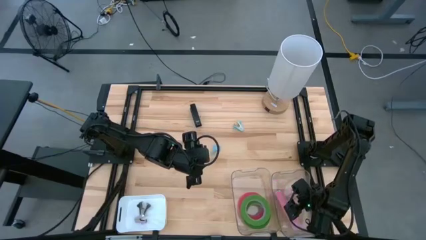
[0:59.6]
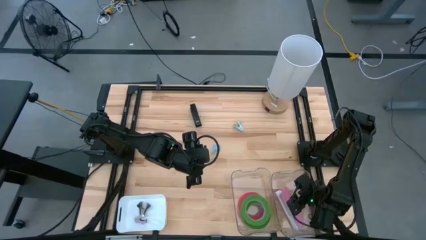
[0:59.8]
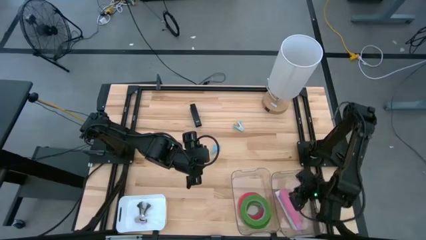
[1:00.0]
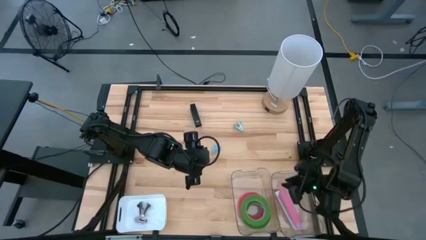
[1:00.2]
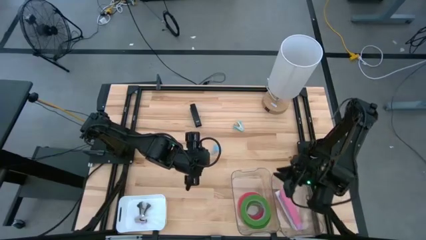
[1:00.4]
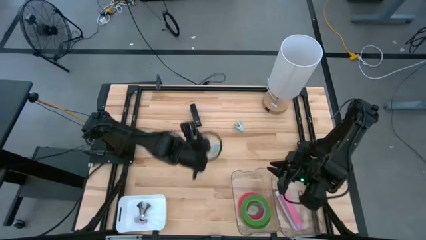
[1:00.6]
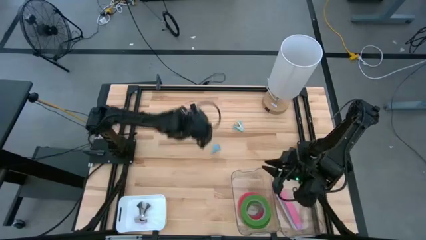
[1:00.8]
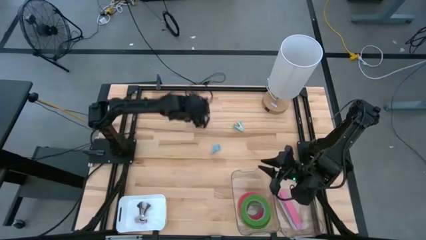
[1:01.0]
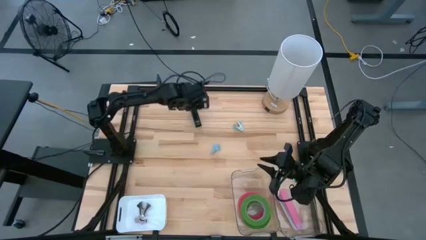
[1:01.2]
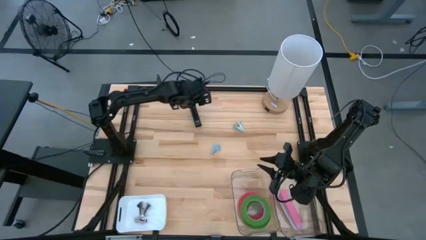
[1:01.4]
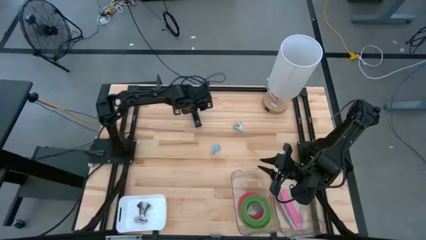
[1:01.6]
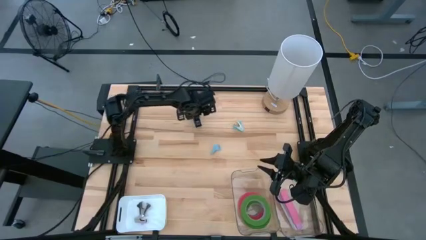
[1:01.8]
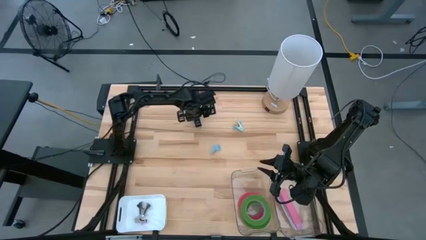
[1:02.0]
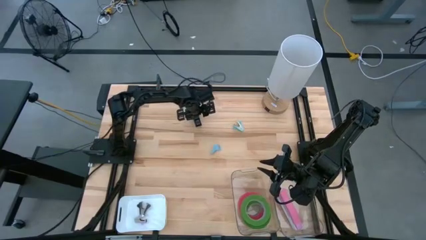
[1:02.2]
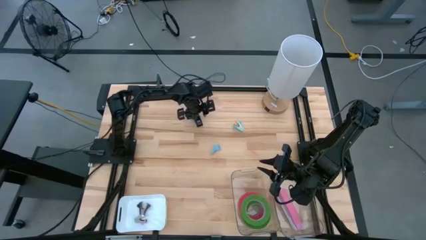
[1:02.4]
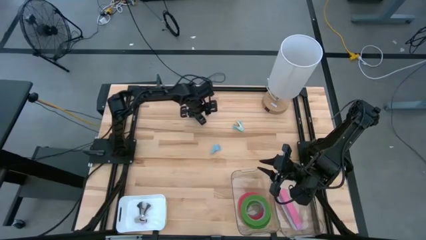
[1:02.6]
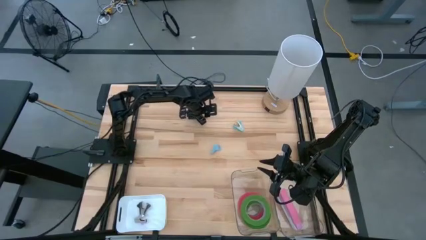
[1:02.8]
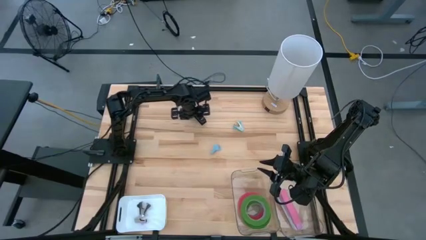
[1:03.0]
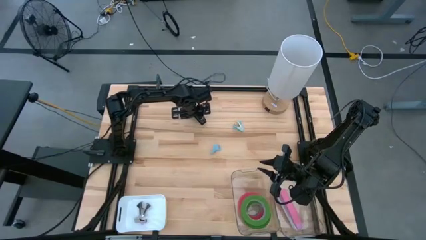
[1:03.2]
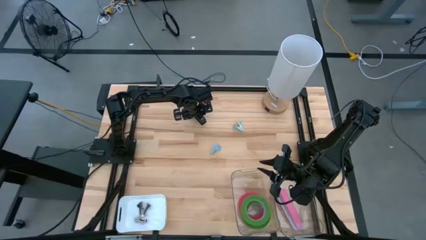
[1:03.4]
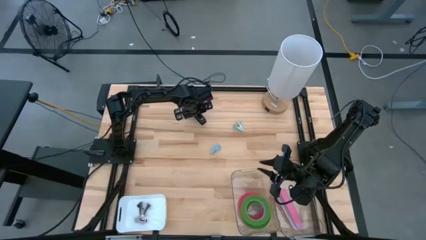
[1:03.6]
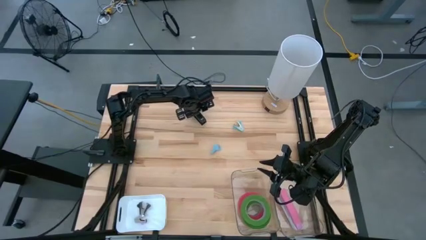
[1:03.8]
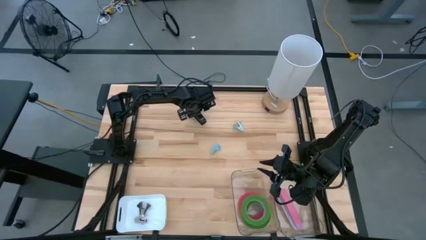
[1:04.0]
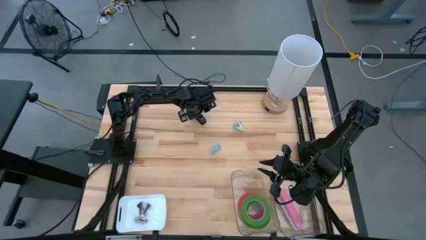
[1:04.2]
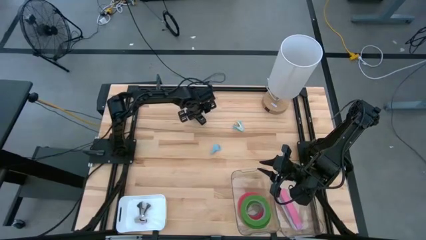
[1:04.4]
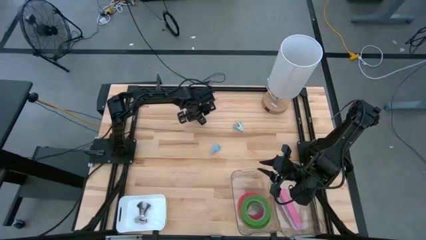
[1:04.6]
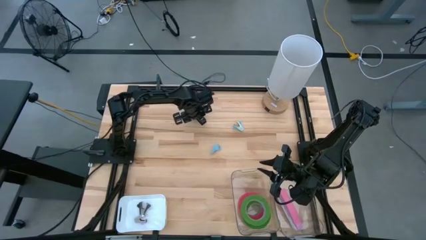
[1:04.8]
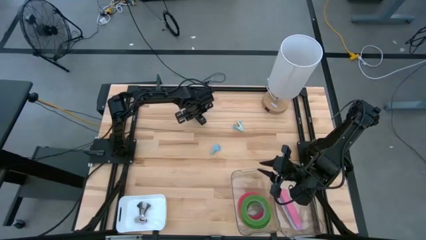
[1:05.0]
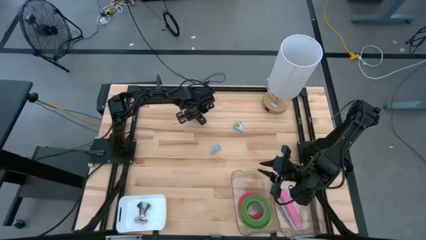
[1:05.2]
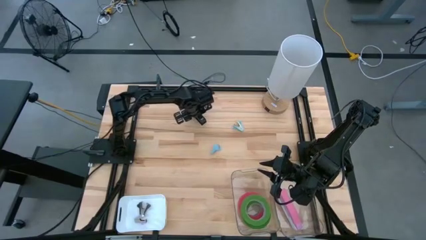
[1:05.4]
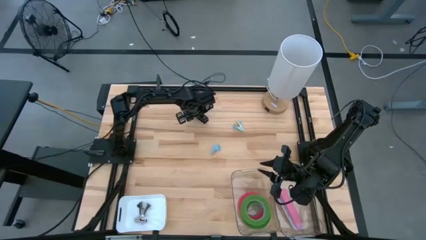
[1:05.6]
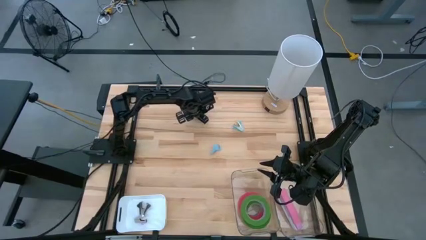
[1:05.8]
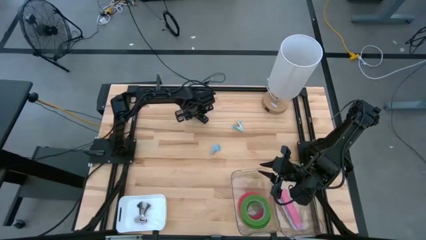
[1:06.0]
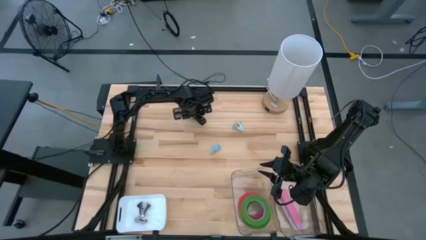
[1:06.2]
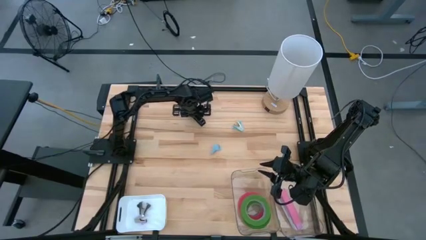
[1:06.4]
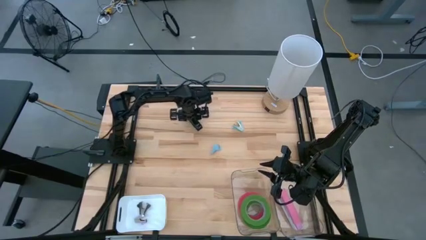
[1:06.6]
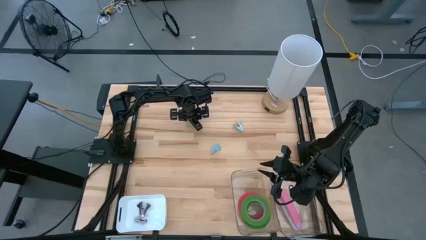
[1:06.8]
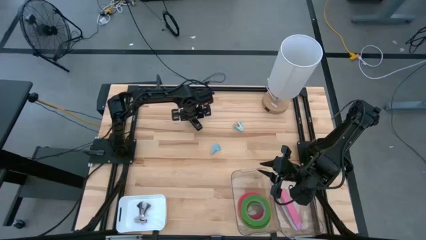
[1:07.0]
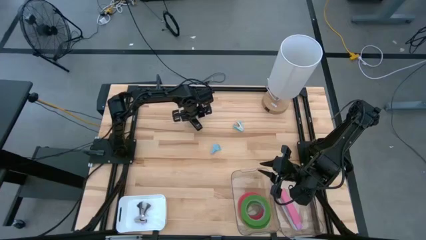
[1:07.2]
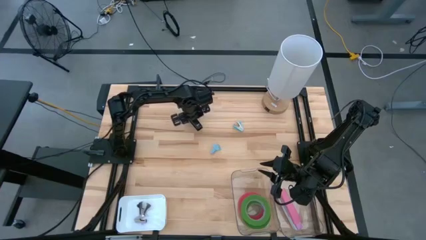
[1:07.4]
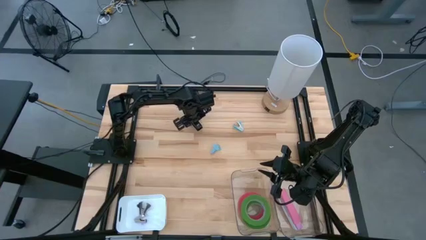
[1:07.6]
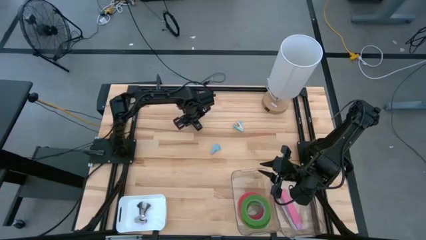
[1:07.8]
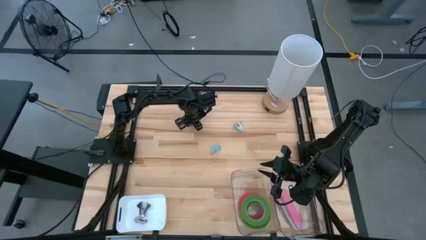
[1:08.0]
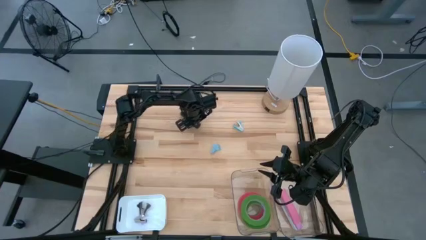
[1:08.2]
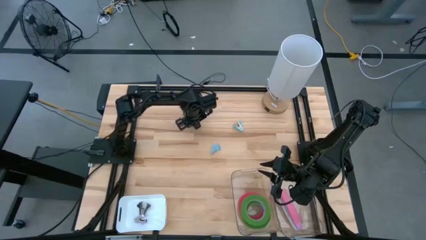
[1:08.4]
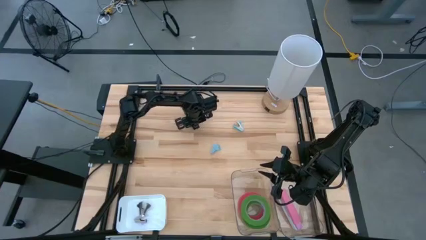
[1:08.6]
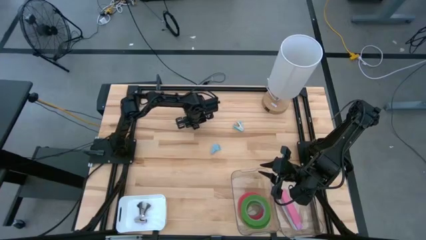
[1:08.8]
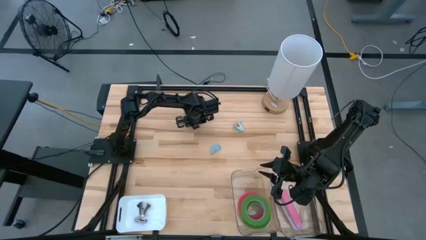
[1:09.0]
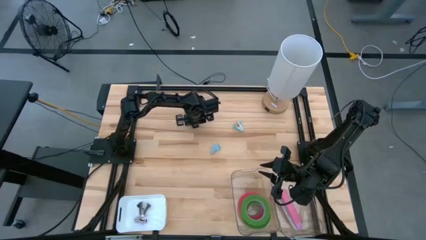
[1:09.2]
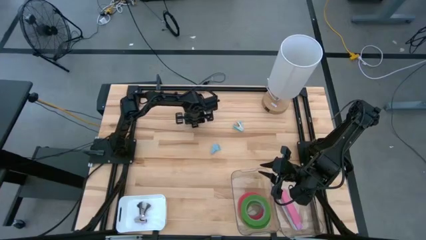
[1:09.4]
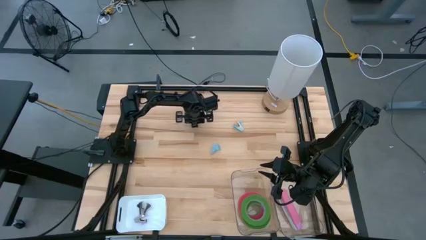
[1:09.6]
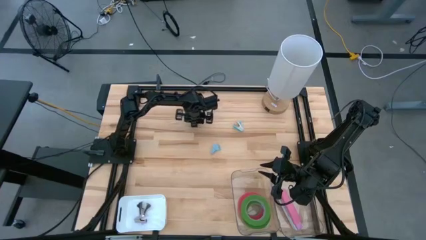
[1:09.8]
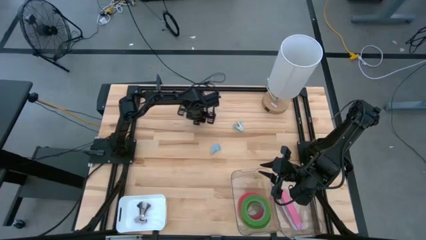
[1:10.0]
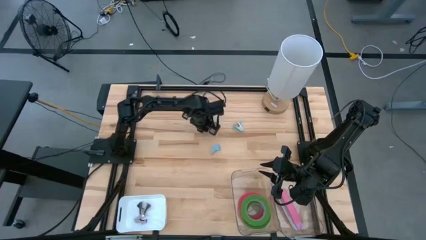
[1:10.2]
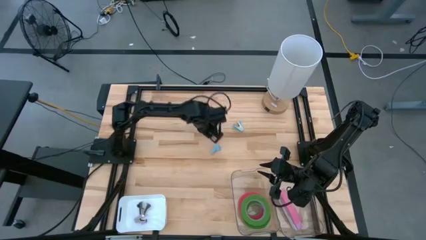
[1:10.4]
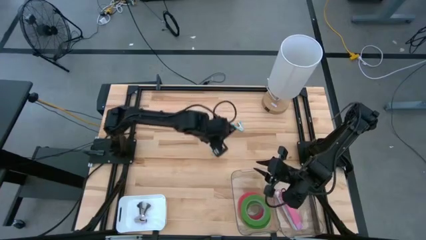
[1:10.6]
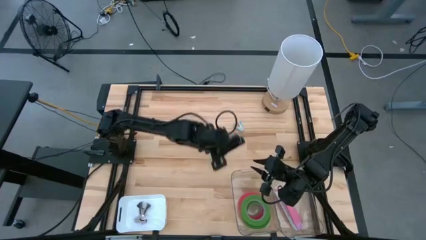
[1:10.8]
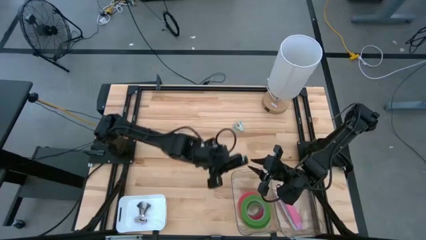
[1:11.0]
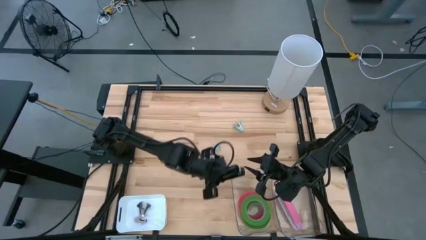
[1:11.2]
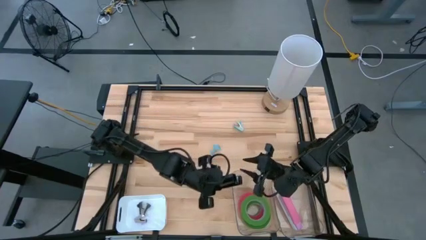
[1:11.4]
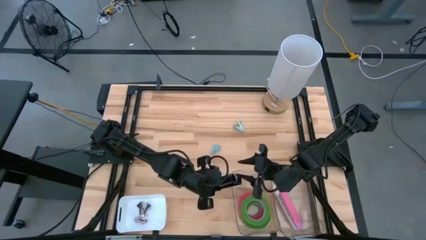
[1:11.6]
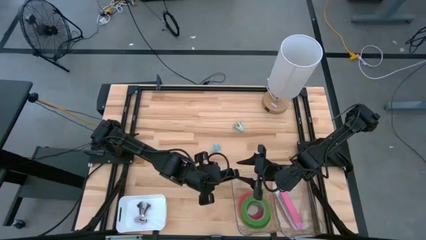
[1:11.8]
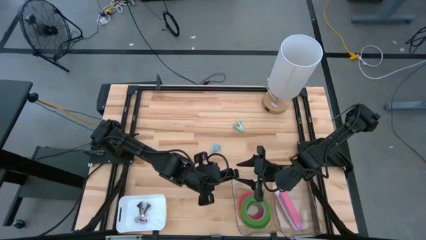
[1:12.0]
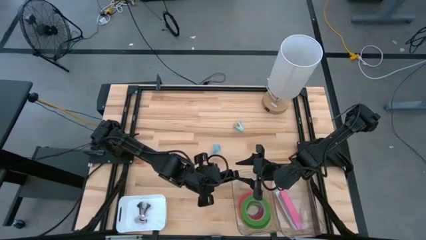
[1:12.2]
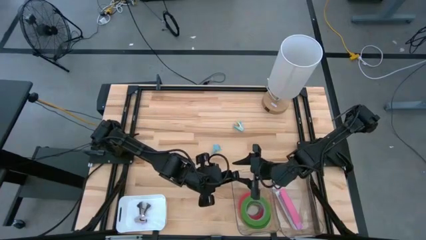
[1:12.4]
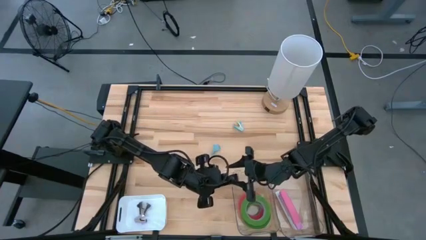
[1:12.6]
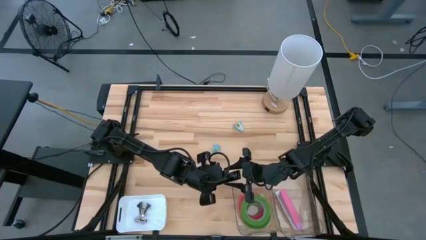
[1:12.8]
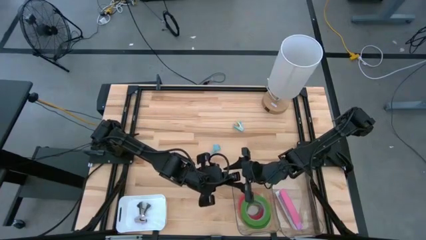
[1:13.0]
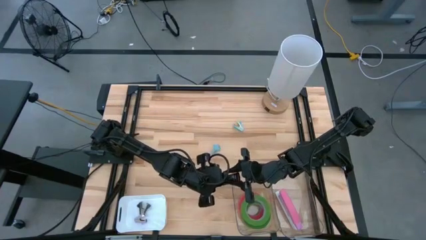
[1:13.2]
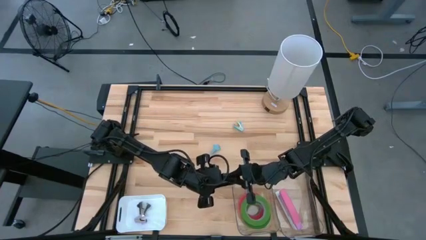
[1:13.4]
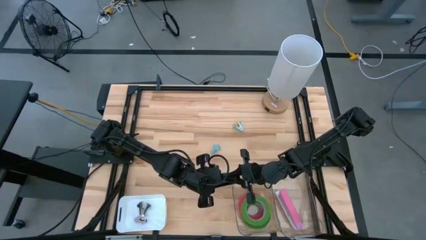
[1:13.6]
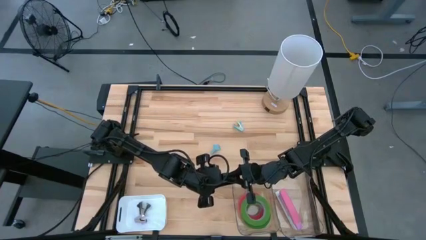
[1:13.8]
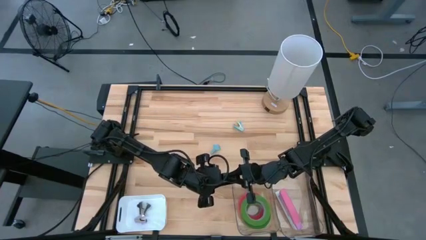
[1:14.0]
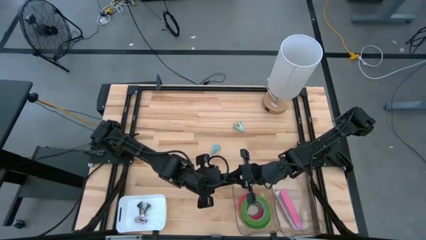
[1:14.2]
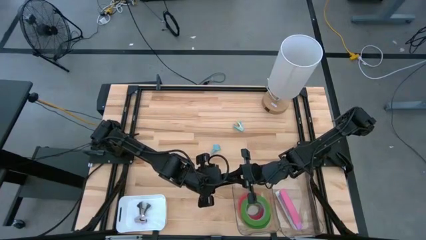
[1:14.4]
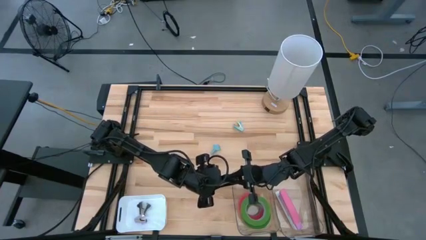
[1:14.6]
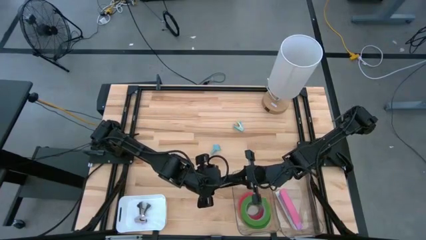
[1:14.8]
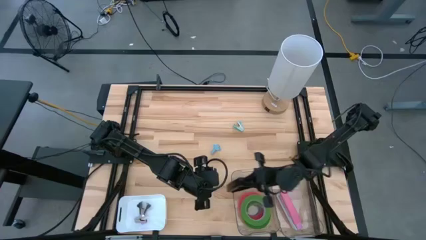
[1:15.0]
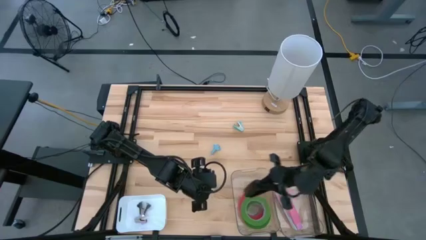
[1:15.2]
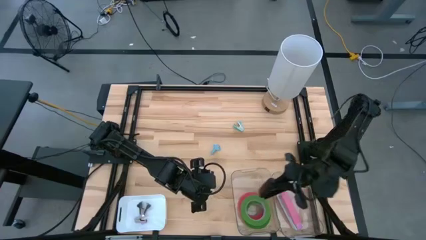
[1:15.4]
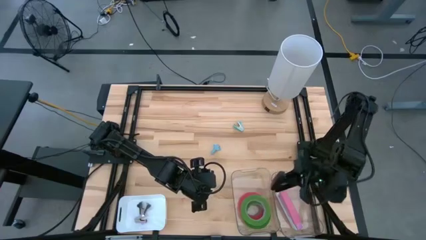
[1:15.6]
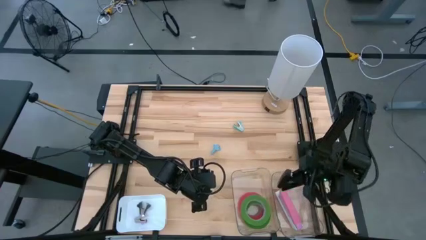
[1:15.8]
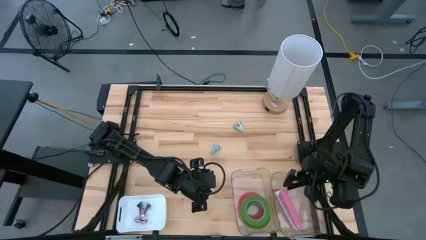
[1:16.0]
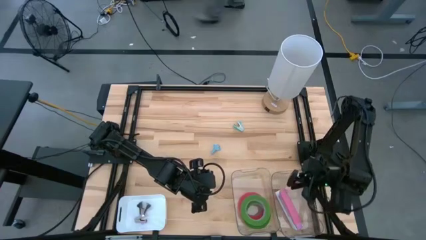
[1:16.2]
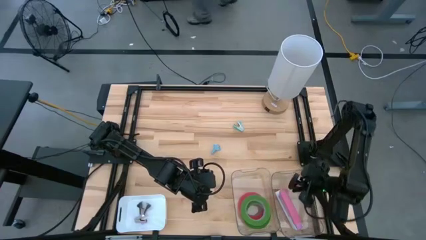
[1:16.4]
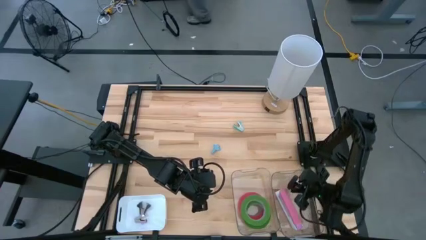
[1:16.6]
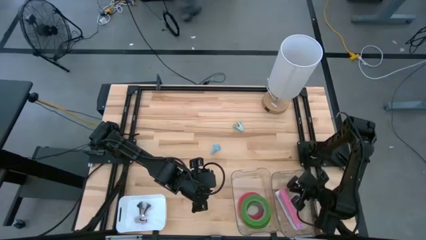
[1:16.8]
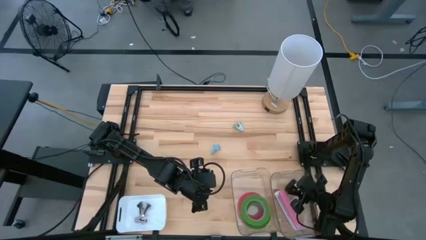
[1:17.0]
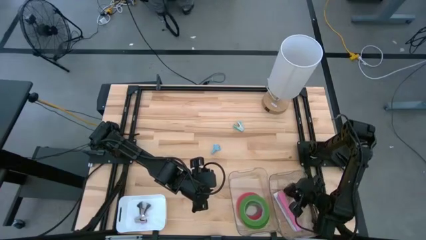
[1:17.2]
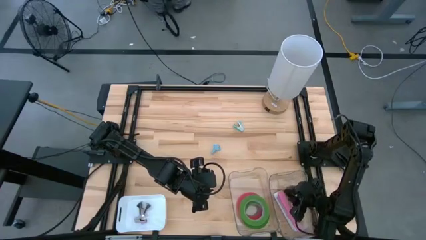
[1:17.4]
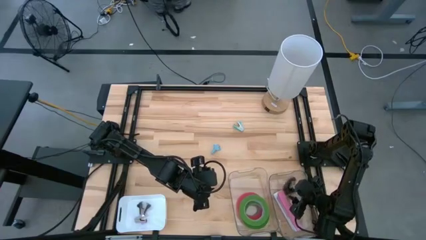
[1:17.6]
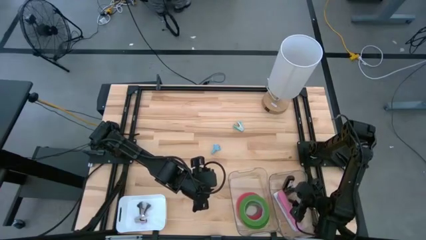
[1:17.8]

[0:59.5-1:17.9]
Task: Pick and place Stapler, Stapler remover, tape
Put the black stapler into the right transparent bin
